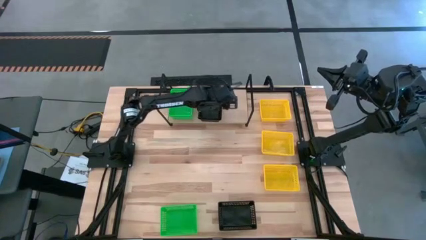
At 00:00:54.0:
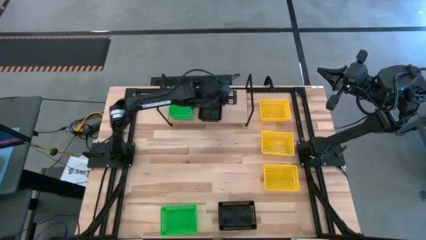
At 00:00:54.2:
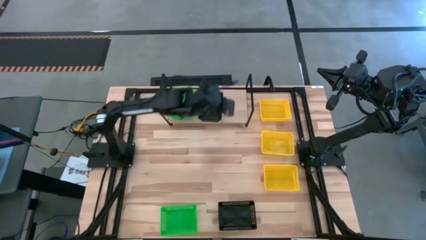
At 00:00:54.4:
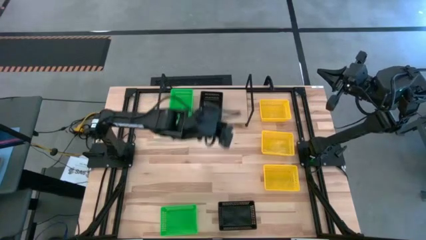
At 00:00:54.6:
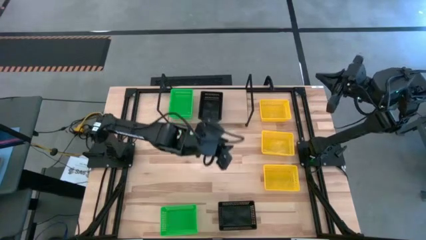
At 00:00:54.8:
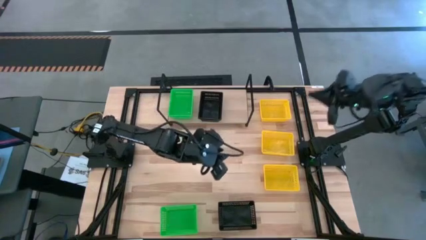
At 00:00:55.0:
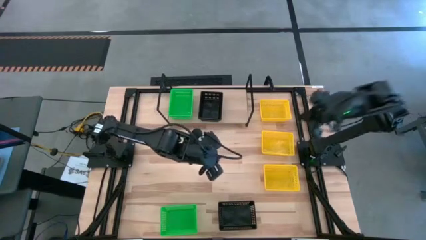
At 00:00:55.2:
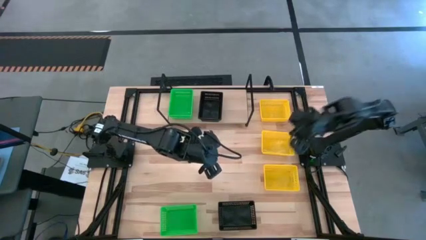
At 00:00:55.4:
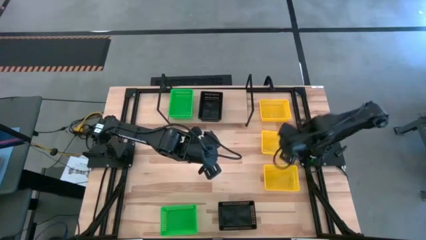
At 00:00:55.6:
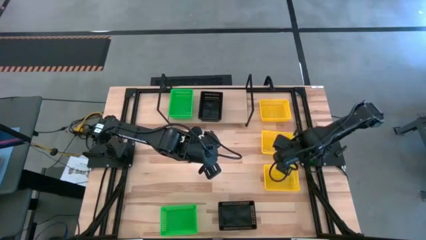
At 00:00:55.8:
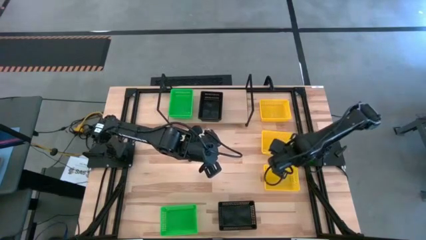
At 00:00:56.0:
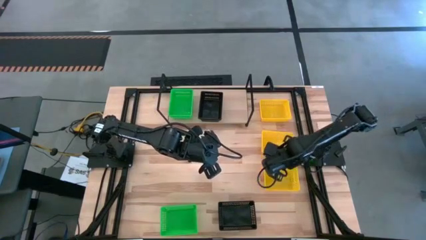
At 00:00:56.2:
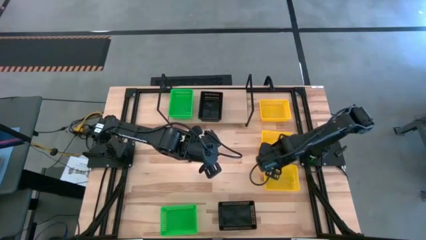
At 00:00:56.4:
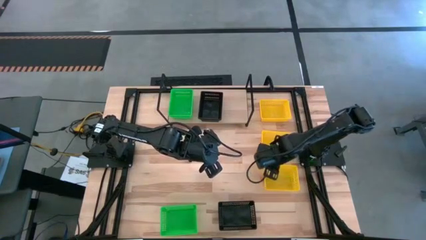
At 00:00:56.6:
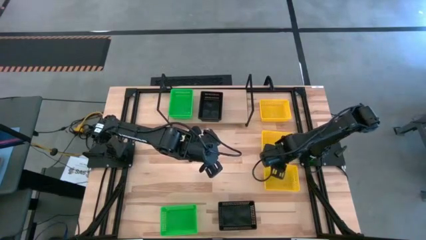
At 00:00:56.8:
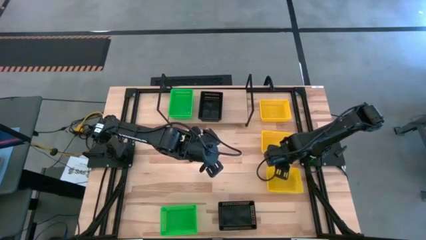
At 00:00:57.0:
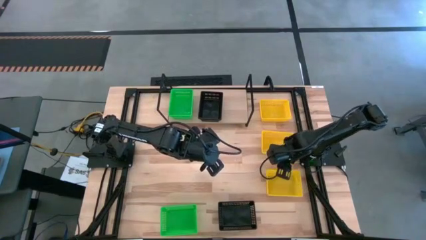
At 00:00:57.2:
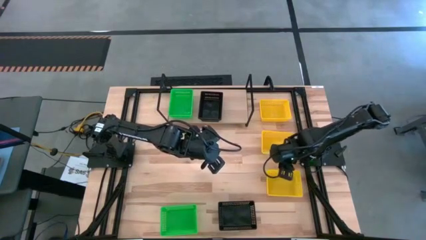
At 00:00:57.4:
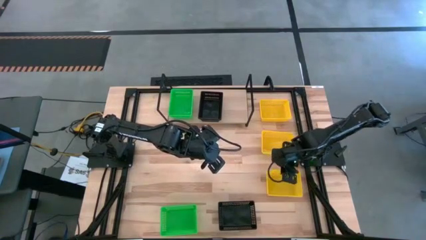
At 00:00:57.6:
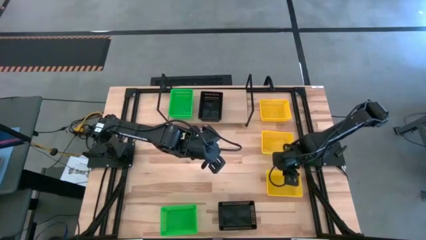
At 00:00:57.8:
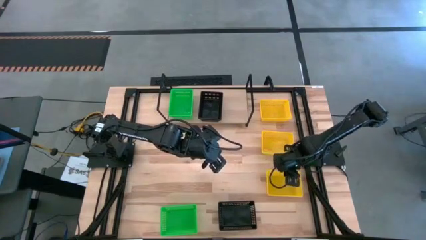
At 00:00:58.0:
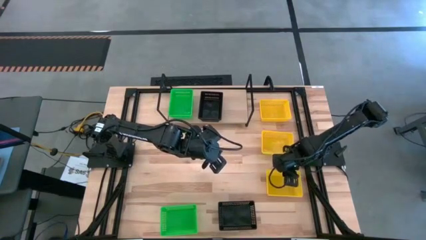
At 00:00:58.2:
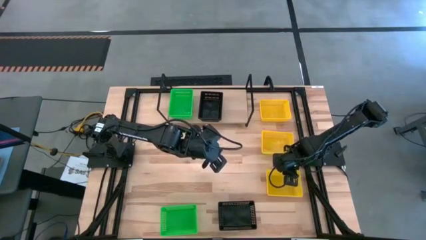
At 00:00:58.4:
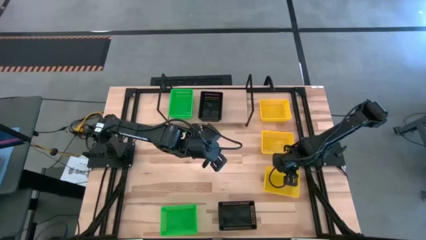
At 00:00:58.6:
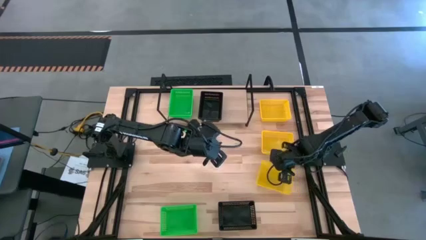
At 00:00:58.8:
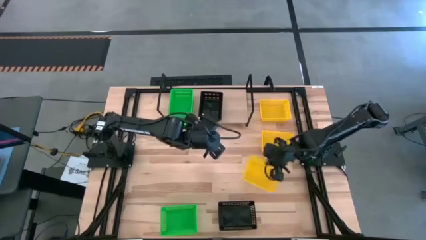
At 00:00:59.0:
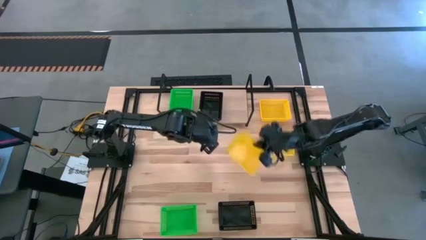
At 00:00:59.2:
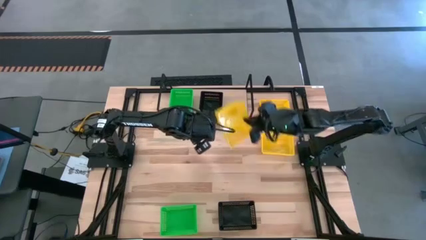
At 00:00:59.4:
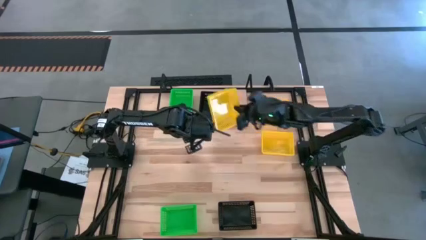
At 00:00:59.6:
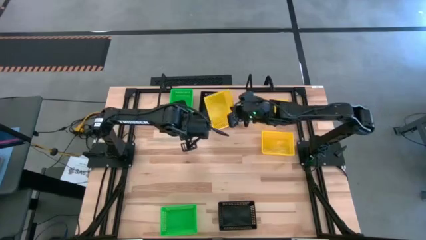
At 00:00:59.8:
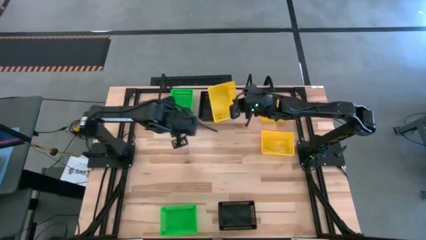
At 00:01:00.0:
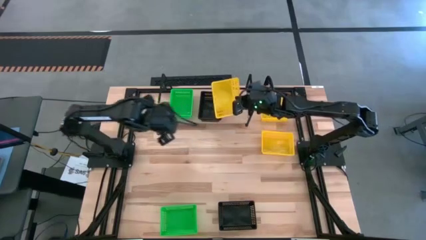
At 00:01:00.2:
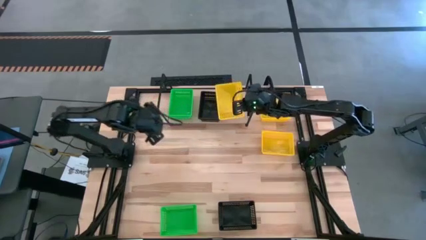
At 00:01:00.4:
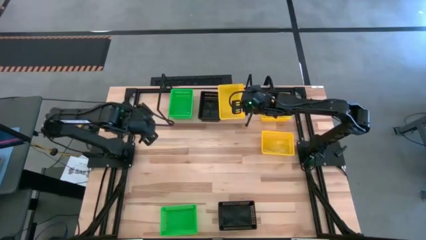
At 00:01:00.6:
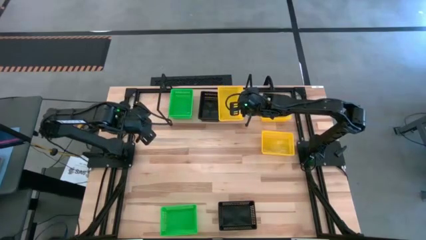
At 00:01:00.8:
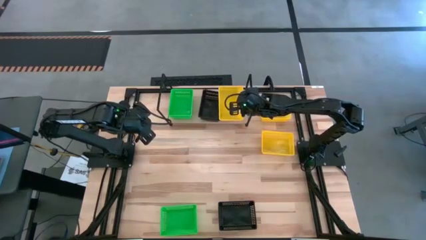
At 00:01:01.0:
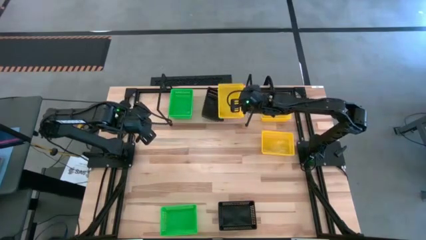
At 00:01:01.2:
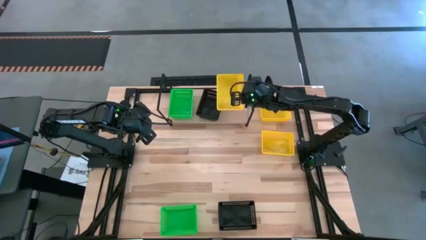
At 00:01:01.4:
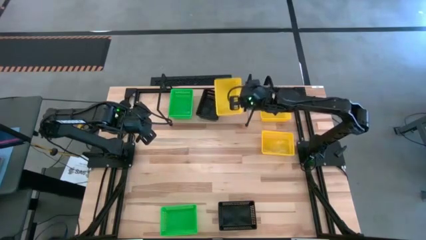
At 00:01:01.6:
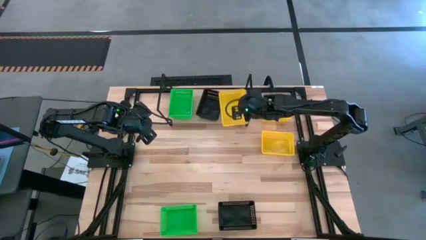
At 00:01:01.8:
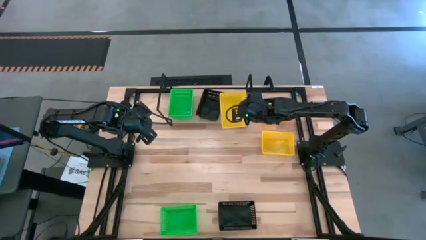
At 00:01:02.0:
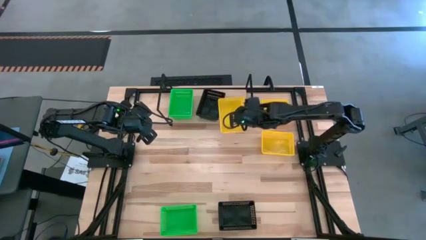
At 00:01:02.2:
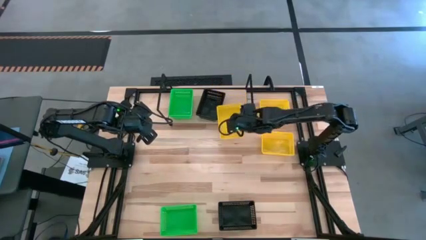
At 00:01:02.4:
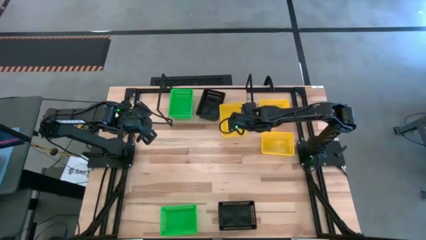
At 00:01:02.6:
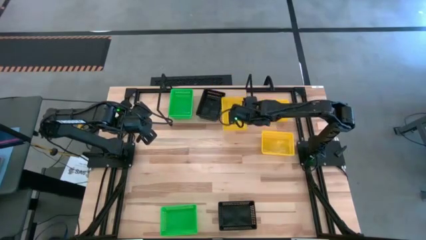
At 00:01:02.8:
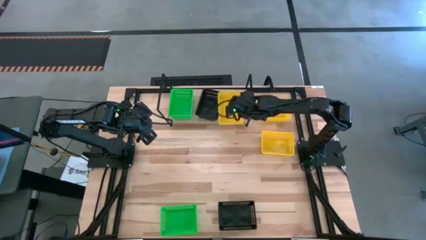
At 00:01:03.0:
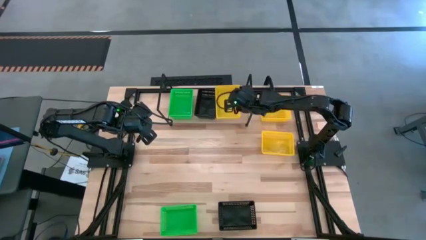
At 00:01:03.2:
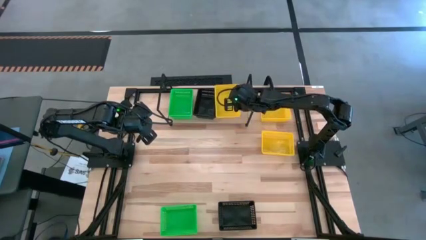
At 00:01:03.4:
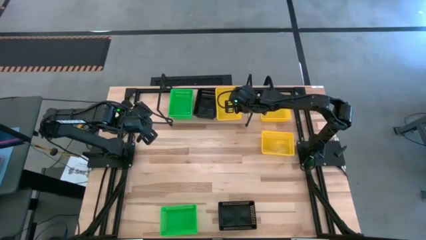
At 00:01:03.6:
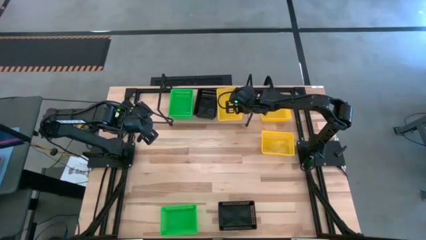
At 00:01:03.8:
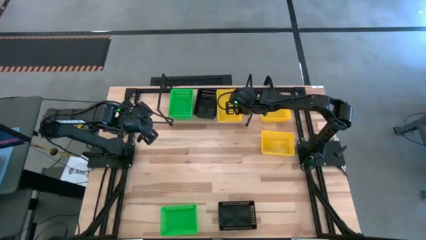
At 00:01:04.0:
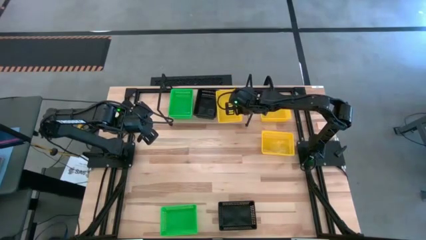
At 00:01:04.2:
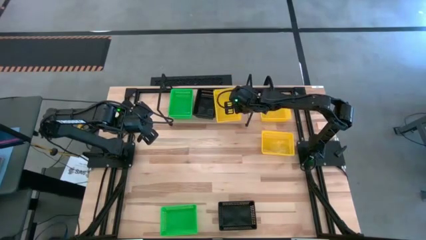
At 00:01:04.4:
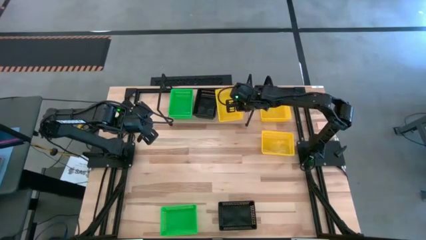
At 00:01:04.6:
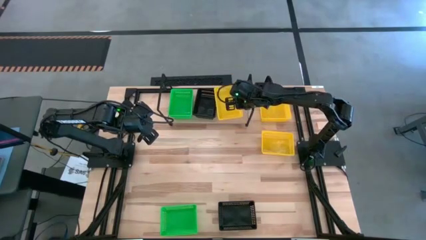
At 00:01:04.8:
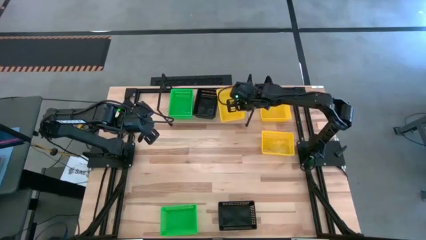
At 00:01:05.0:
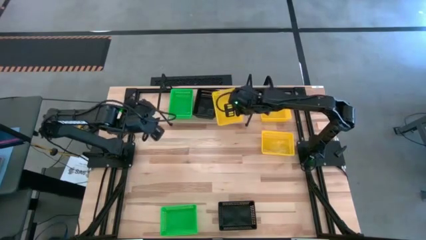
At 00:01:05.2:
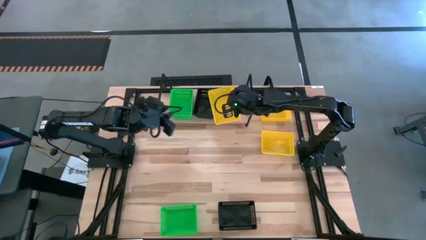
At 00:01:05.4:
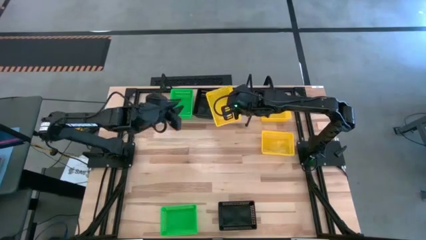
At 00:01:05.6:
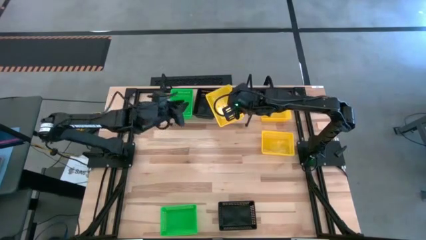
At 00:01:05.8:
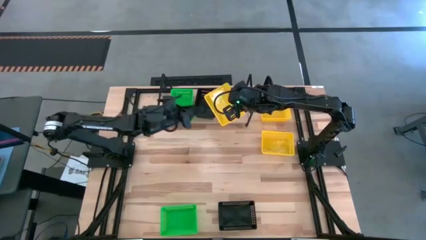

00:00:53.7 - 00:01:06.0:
Task: Stack baskets on shelf by color
Put the bottom yellow basket on the shelf
